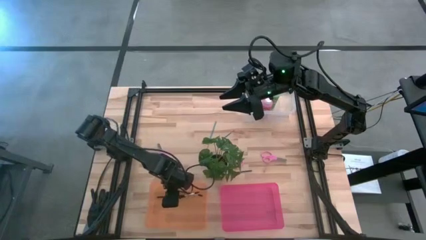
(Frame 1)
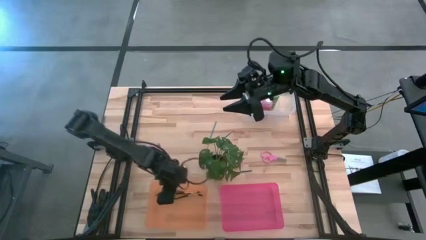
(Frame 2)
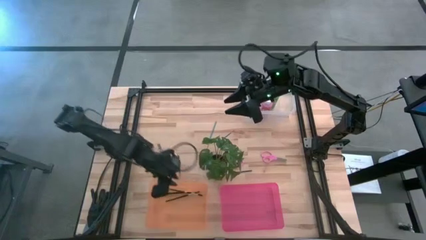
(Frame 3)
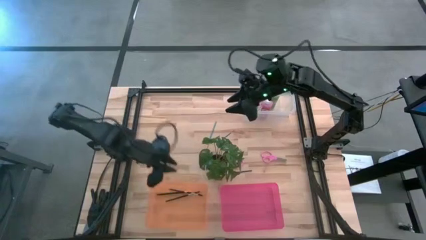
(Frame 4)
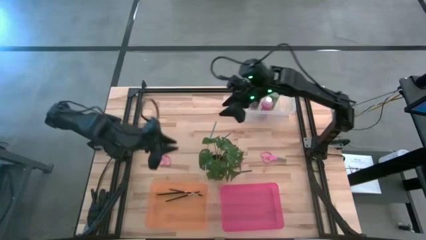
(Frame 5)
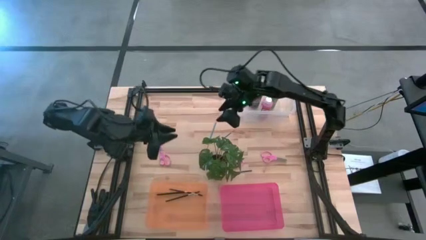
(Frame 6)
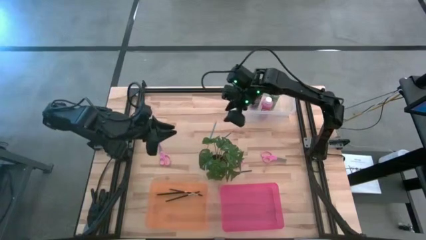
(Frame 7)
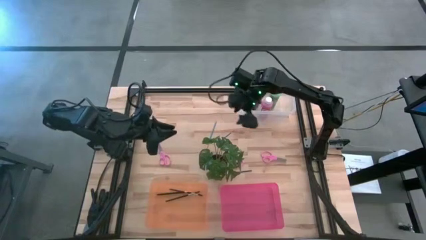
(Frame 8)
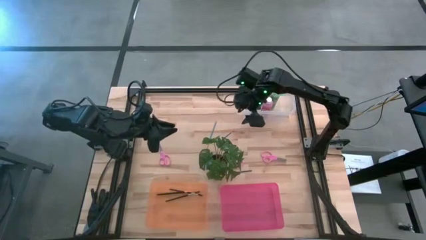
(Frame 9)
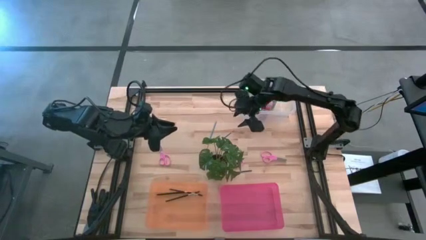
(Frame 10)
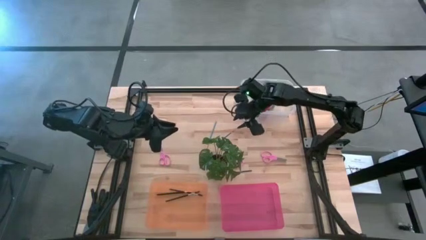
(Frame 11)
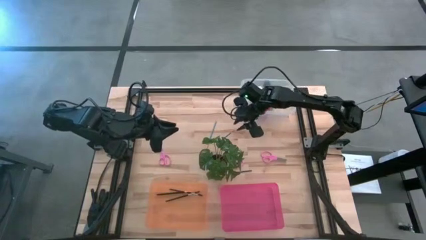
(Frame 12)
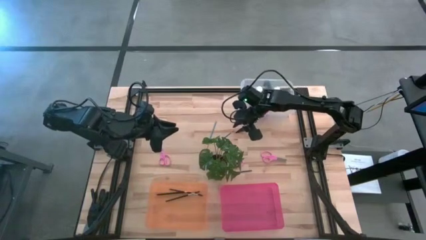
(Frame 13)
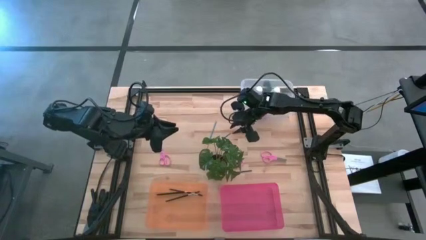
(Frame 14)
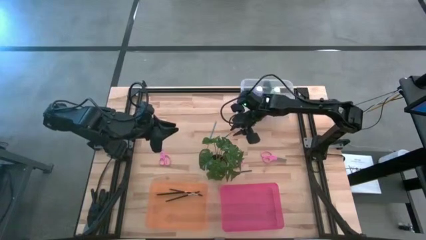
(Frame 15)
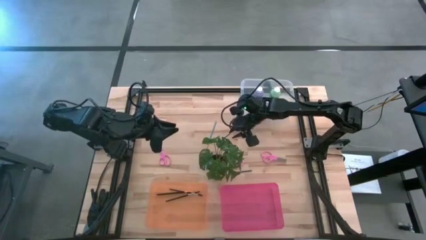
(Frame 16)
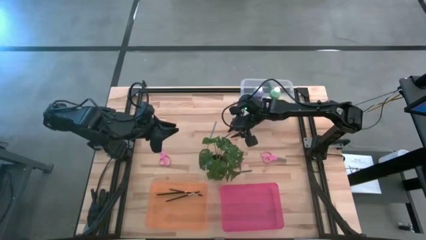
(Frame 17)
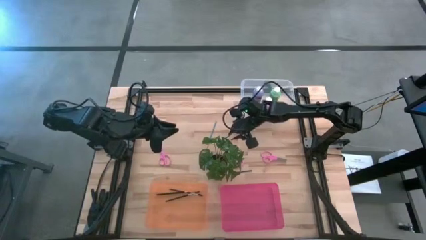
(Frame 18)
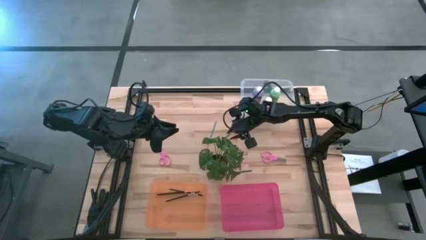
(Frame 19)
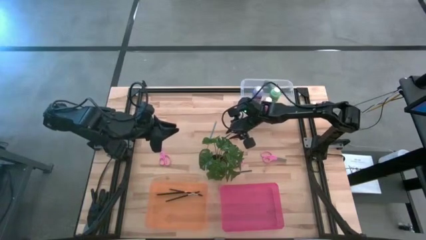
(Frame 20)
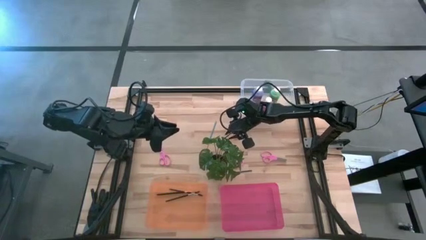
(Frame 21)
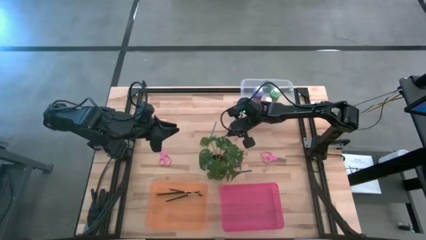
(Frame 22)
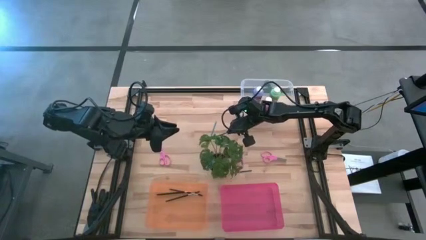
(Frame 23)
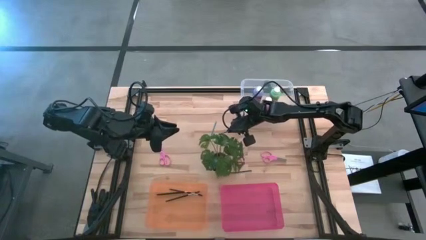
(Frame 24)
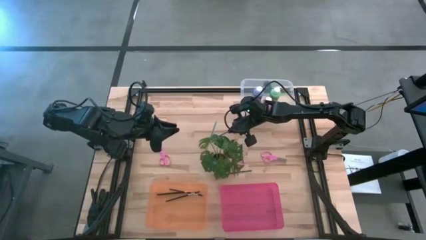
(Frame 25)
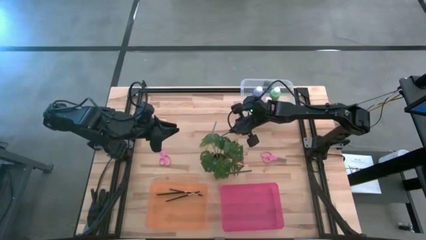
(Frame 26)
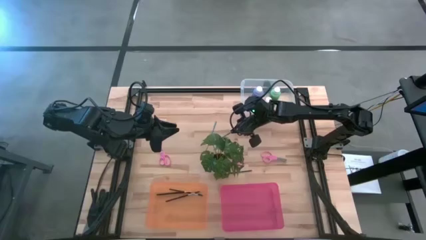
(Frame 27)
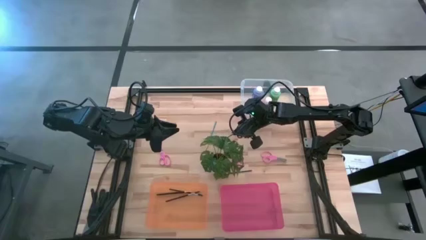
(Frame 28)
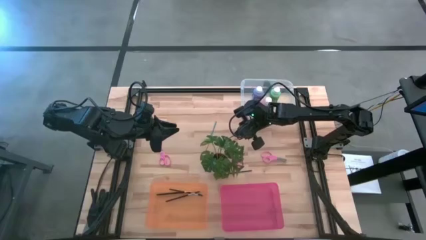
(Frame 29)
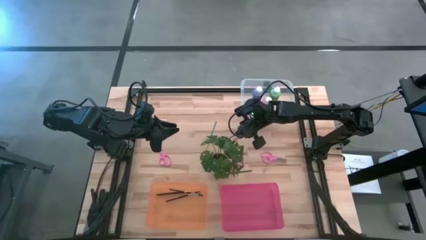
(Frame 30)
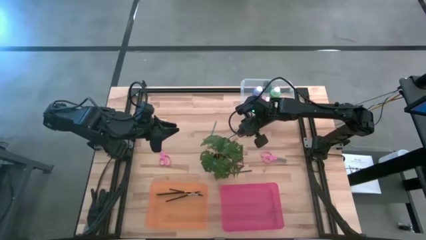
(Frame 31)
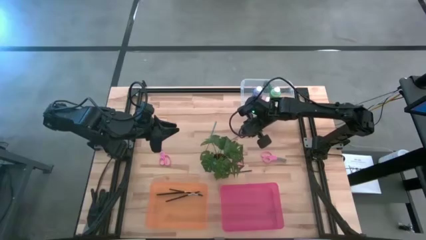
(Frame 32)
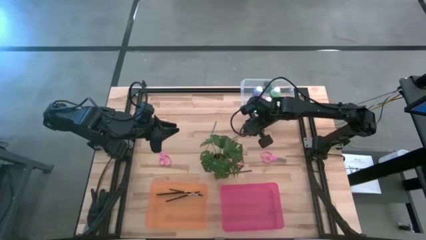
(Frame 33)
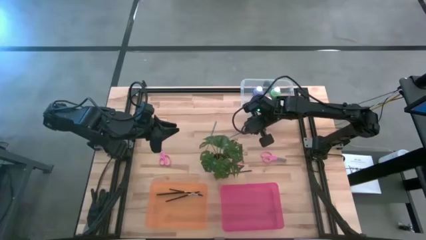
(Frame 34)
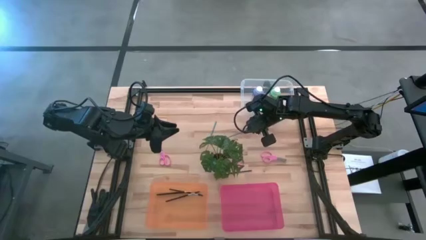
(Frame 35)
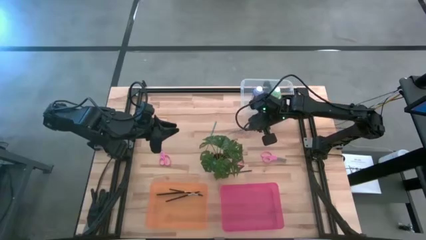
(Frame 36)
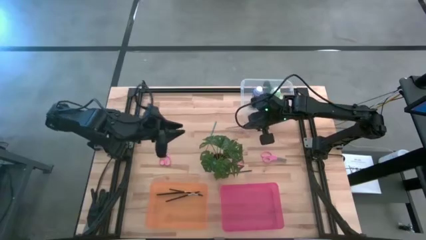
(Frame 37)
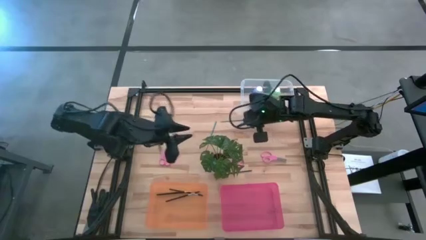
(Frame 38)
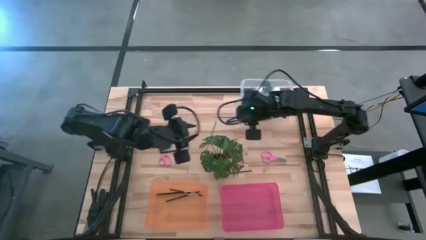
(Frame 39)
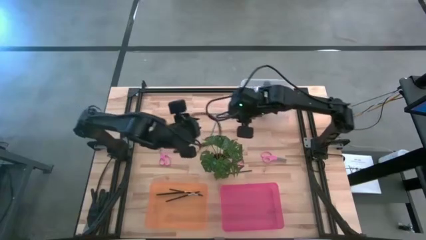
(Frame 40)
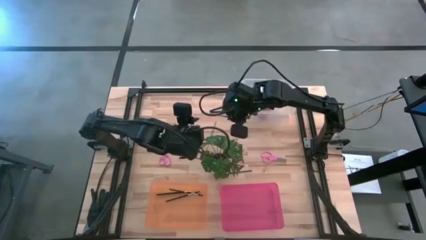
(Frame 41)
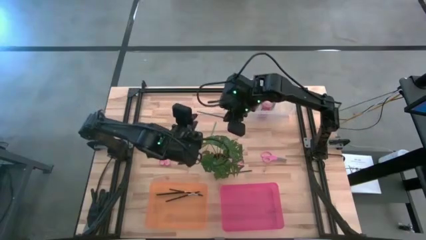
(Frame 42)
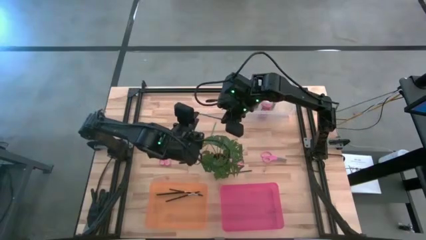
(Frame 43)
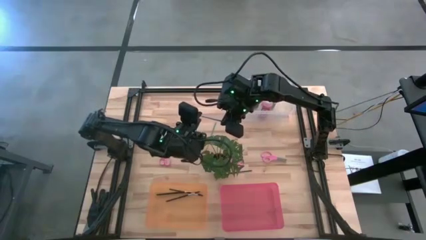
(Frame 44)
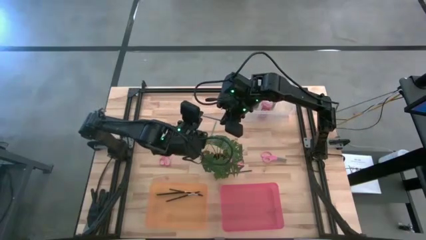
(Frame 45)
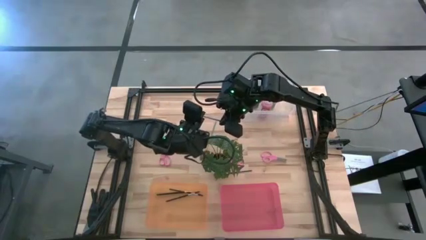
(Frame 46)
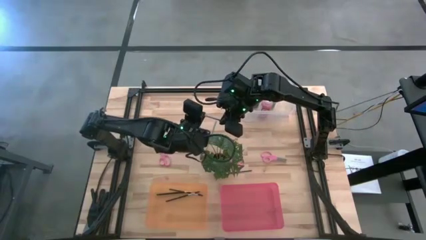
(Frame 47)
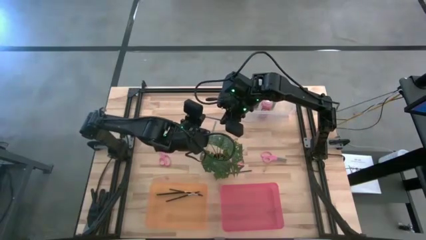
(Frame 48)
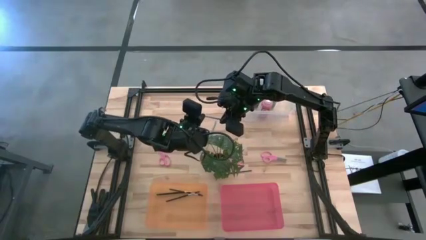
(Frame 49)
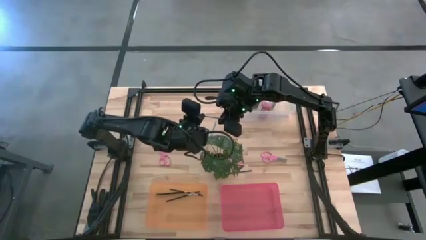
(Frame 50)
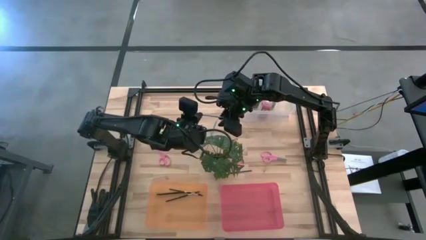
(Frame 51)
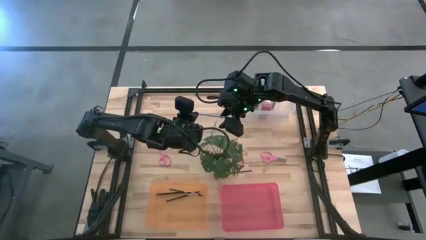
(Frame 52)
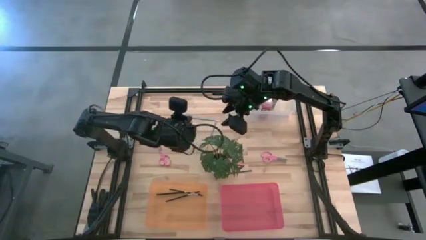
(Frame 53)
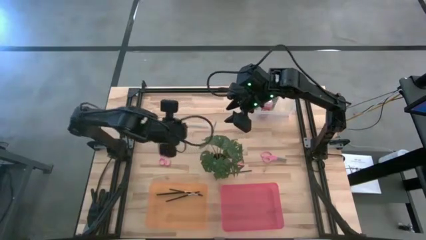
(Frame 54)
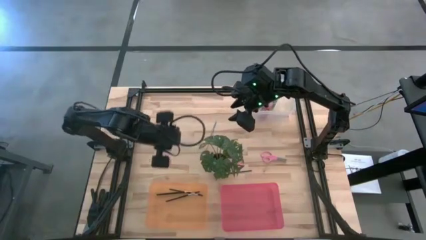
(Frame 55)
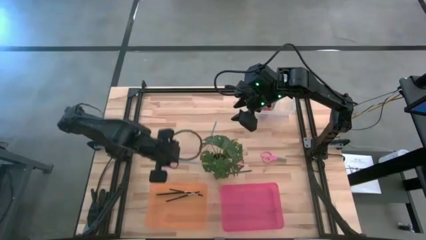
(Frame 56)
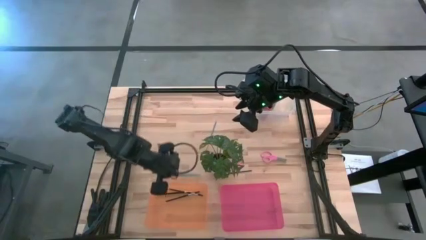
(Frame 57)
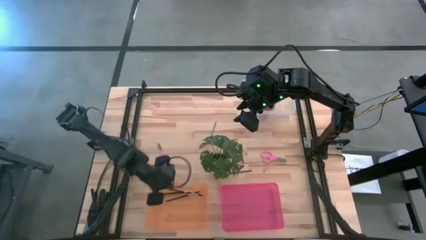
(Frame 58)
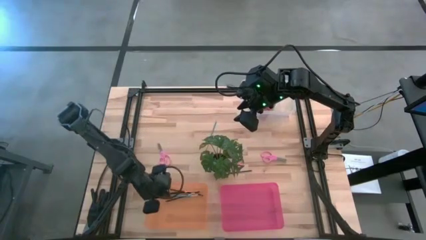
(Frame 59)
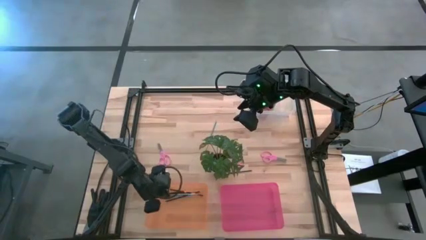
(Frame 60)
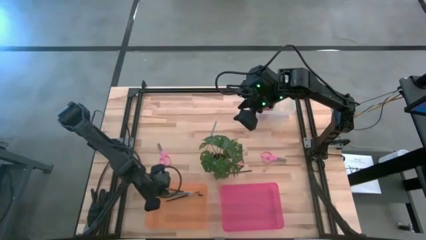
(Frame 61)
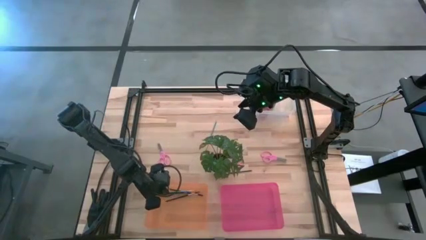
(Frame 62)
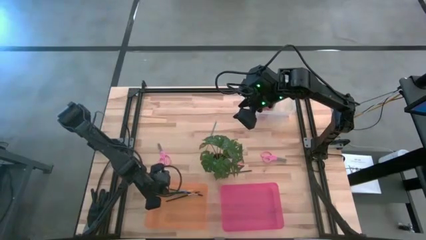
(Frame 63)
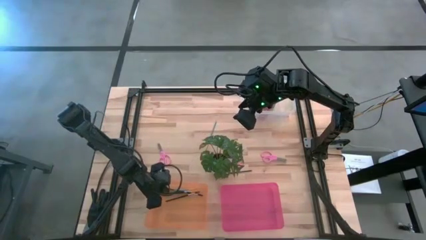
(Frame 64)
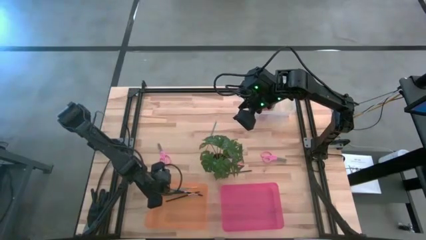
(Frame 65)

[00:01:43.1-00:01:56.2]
Task: Pick & Place Paint Supplies
Put the right blue paint brush into the orange bin
